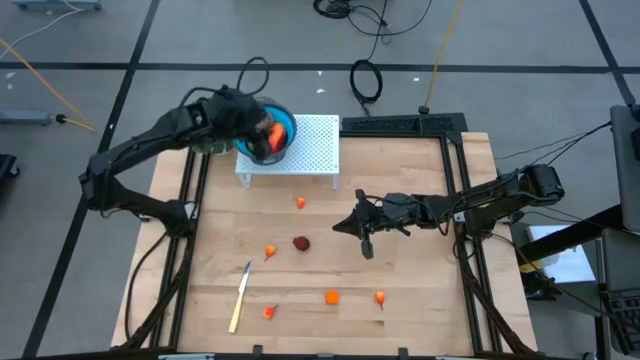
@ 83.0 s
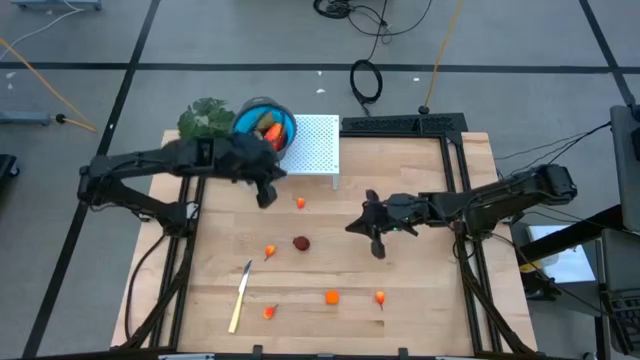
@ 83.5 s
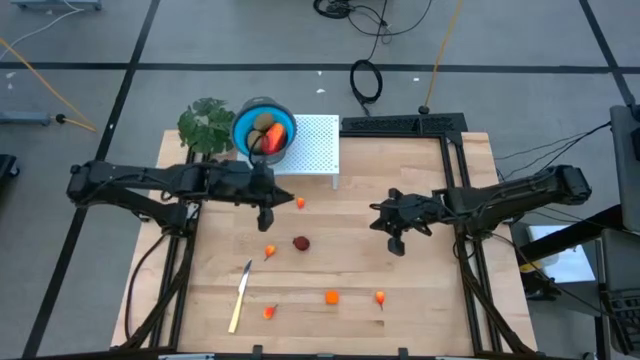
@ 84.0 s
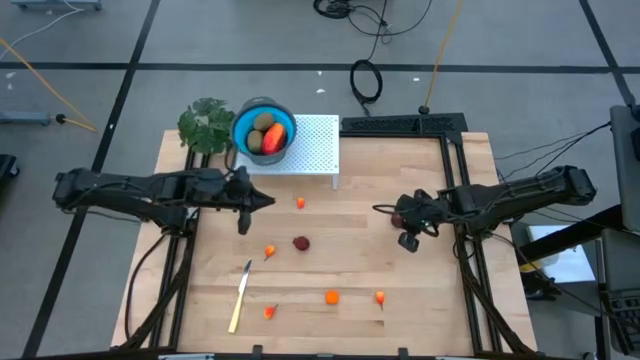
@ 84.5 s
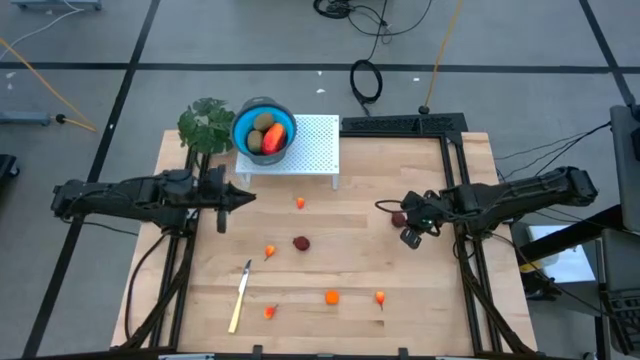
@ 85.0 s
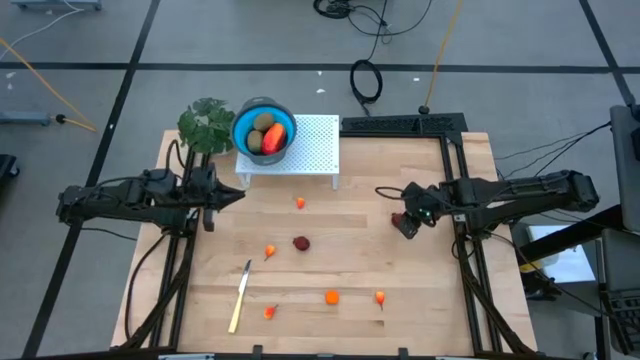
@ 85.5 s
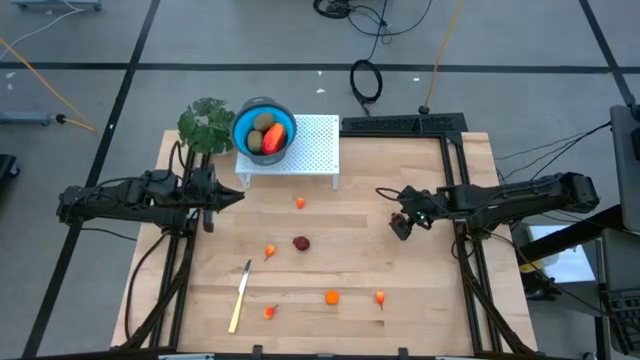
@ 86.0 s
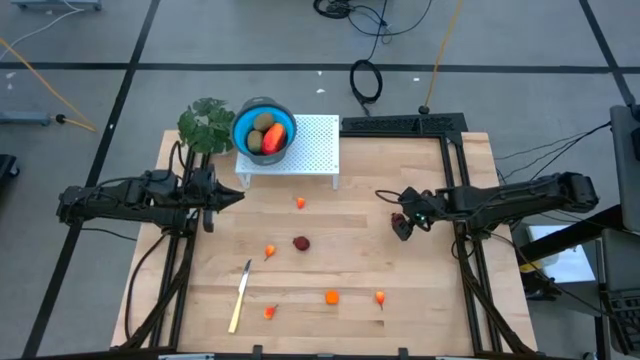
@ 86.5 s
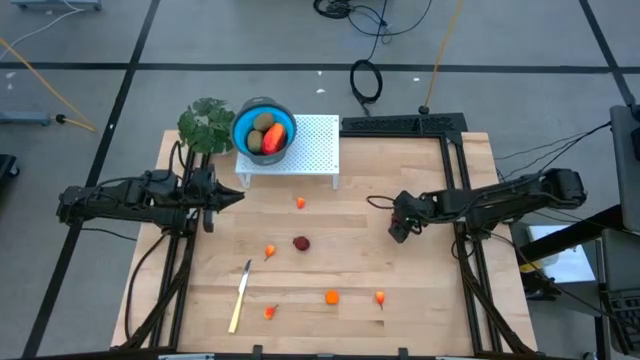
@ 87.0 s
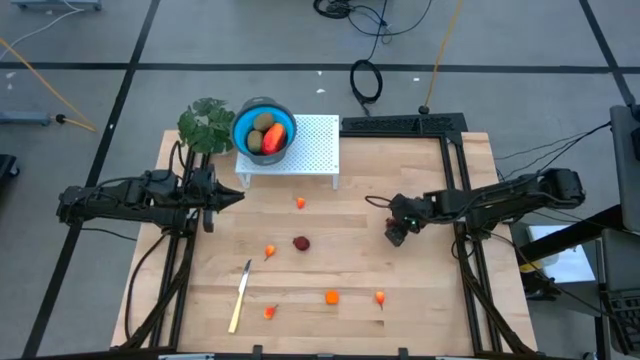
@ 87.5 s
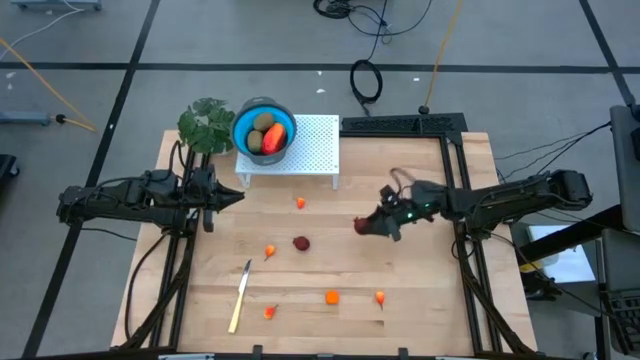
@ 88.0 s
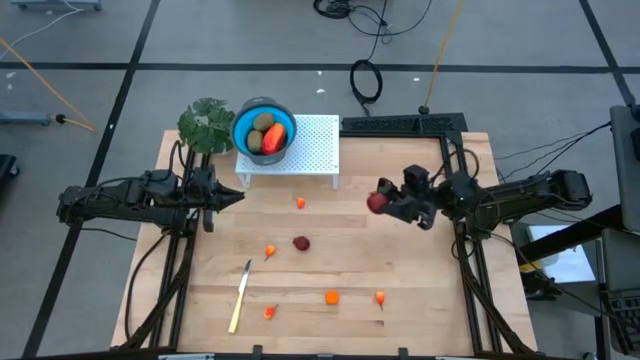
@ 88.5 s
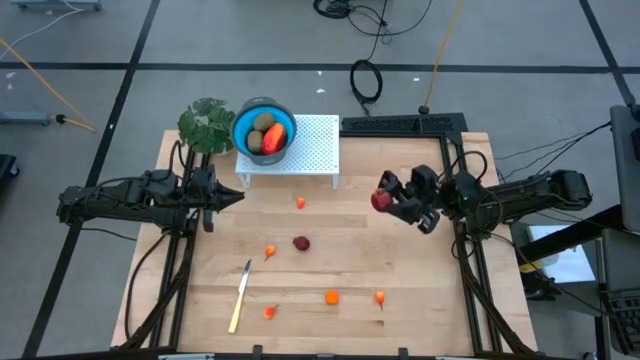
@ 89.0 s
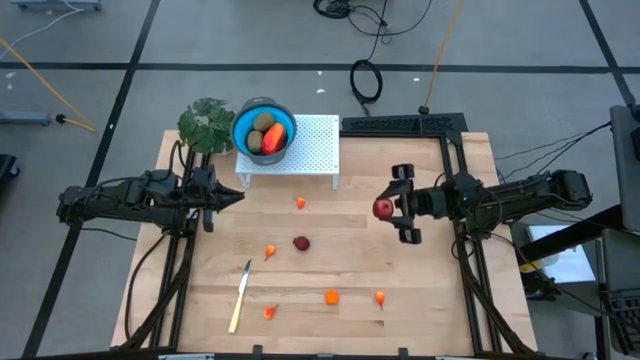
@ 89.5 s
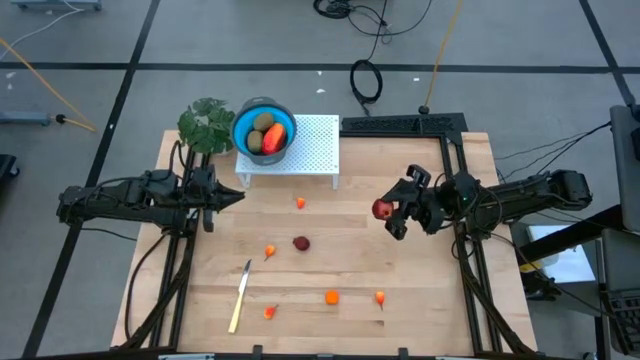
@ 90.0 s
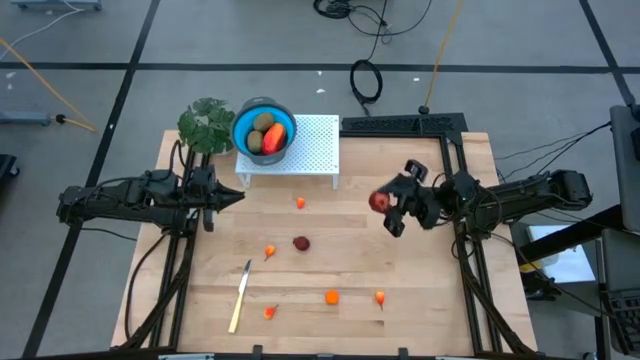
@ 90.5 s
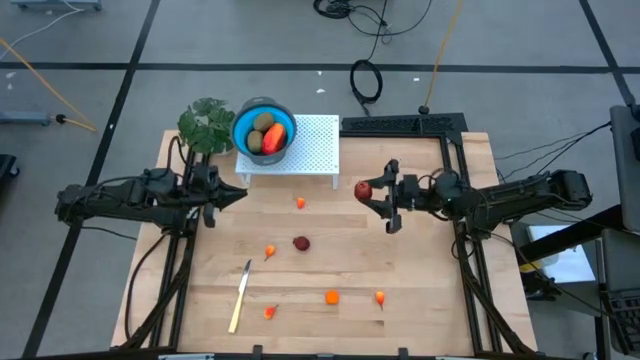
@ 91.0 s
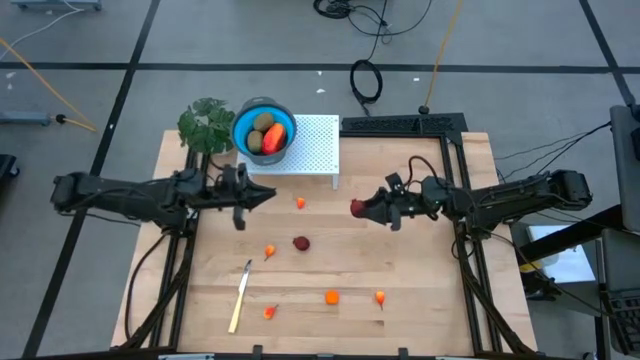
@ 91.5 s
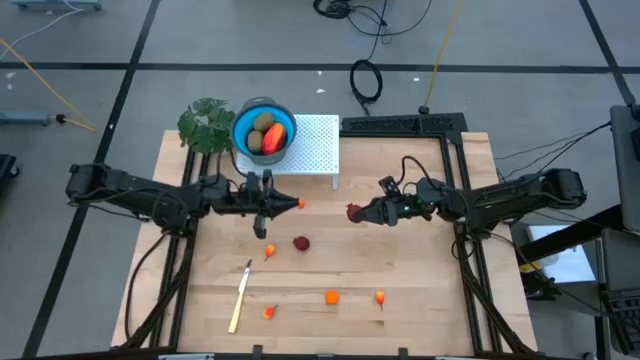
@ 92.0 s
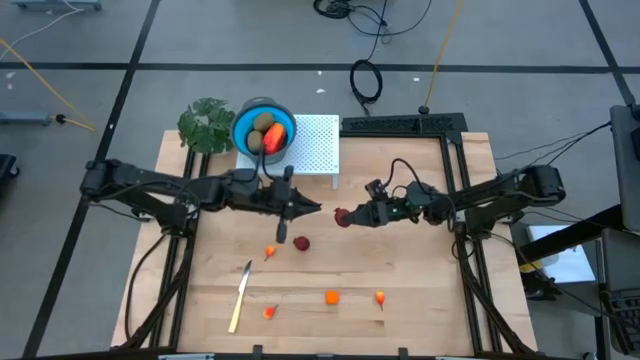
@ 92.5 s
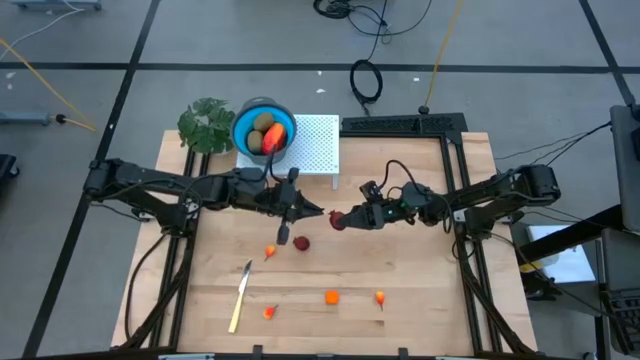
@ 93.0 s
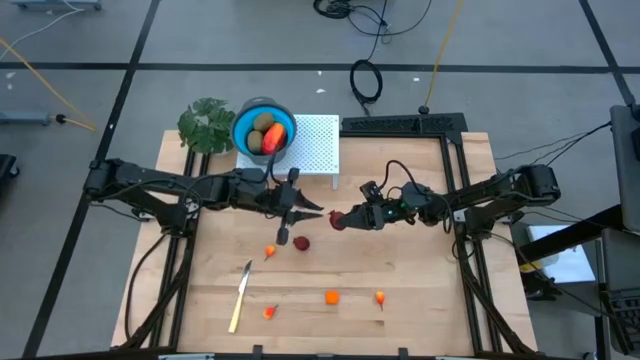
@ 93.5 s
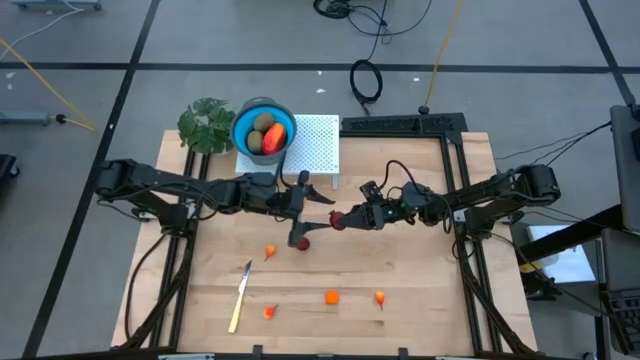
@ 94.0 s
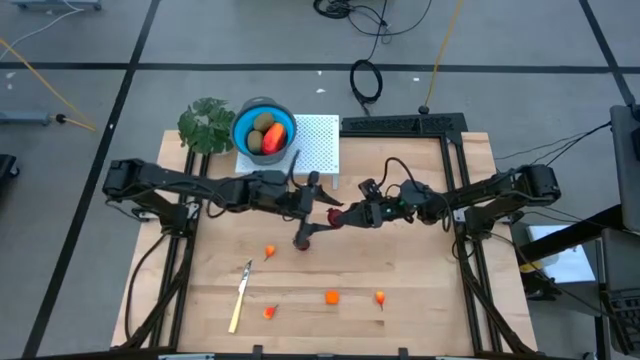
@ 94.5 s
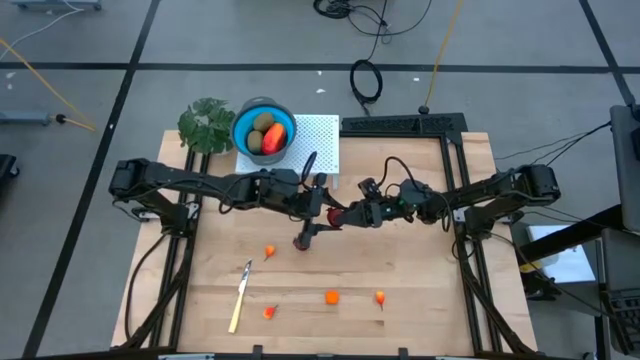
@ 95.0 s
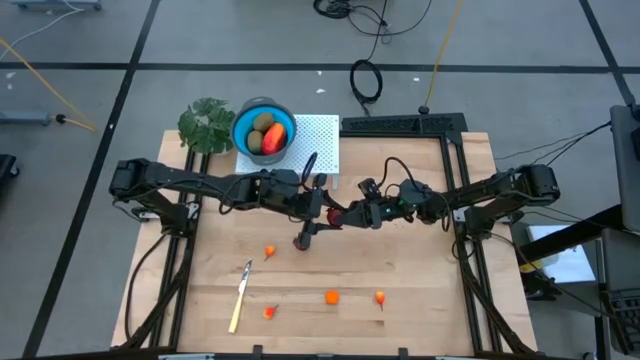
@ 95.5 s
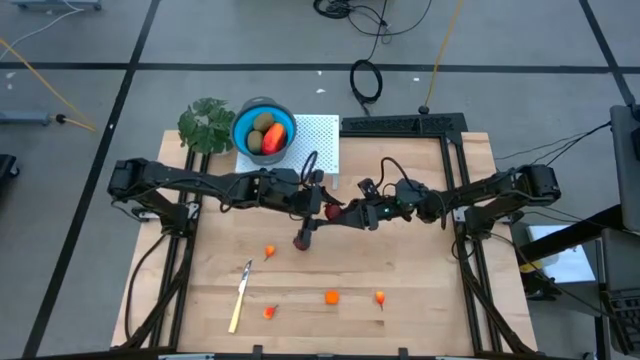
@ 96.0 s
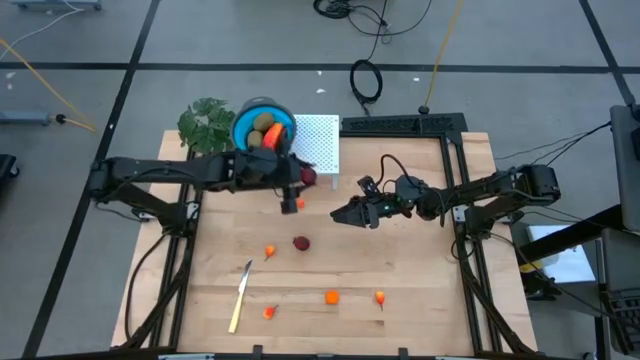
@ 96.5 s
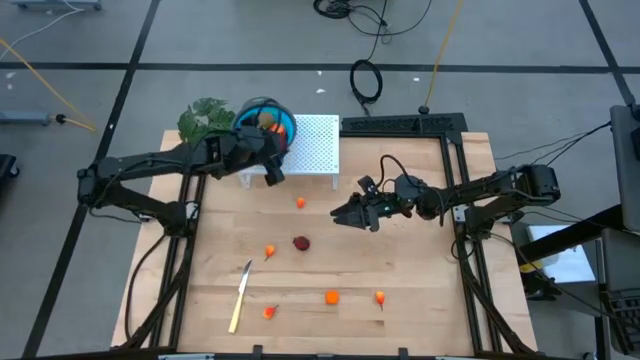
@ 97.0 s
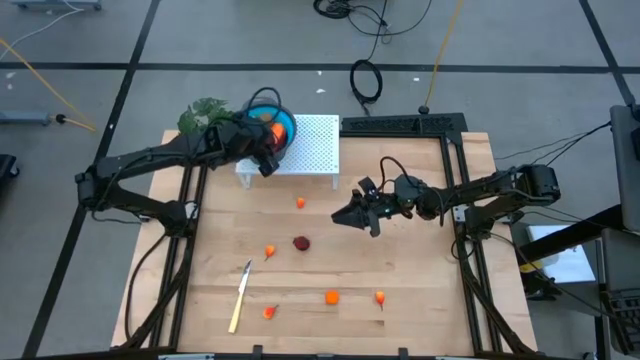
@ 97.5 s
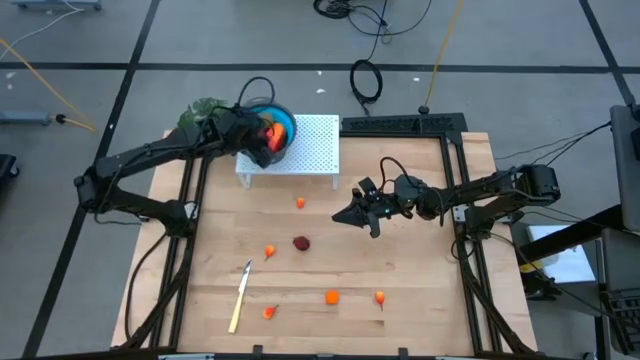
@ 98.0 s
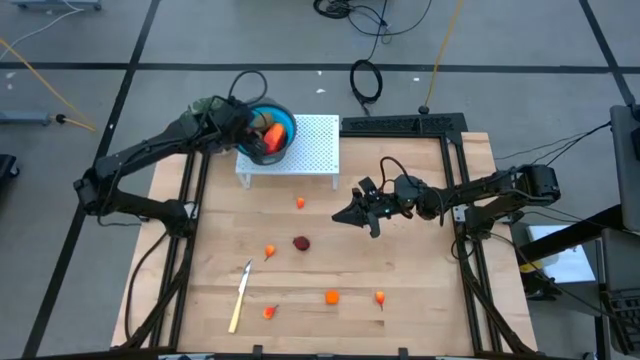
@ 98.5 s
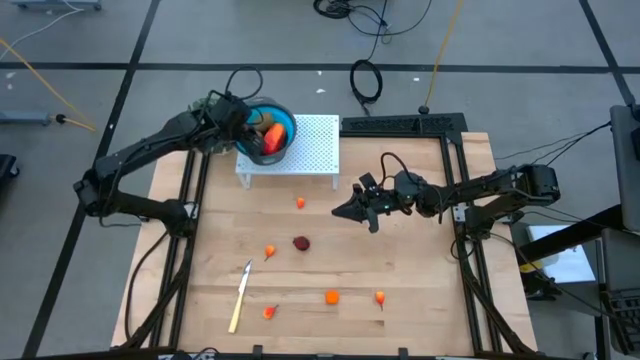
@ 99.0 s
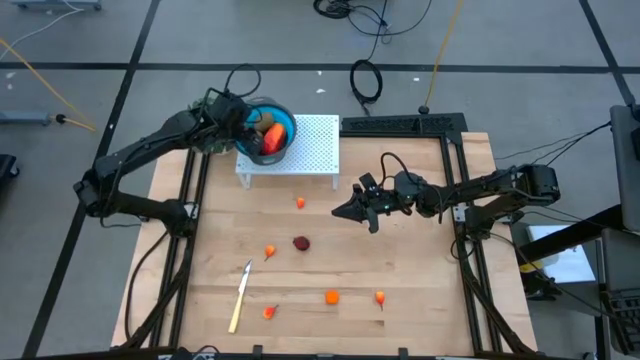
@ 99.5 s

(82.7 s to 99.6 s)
Task: Pick & Place Fruit
Put the right pomegranate into the blue strainer bowl on the shelf

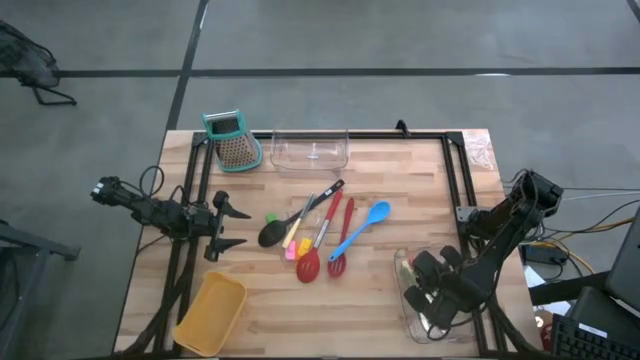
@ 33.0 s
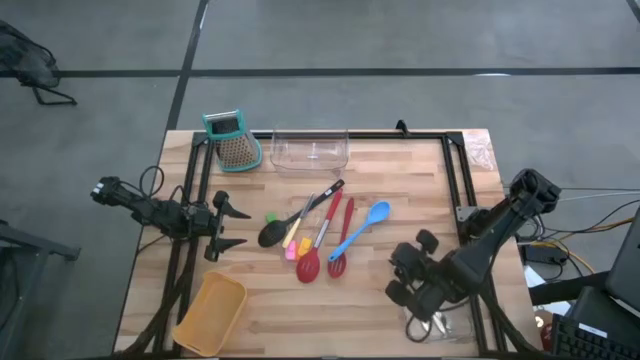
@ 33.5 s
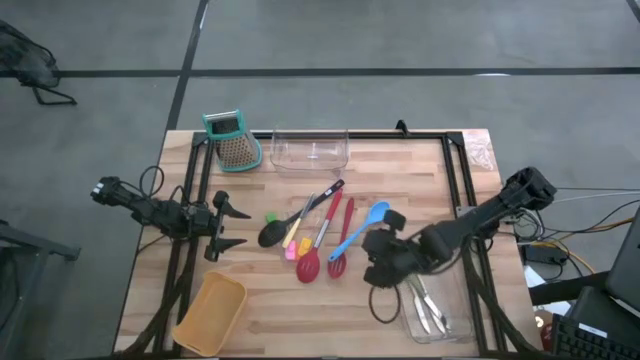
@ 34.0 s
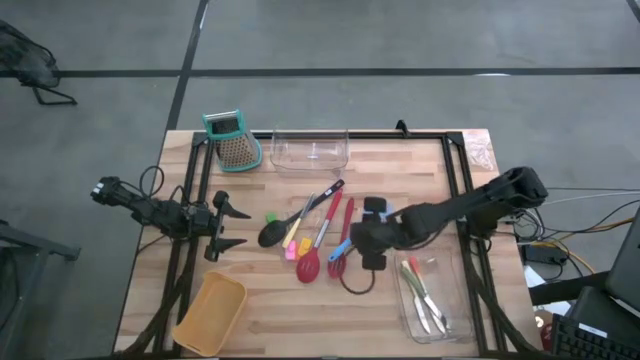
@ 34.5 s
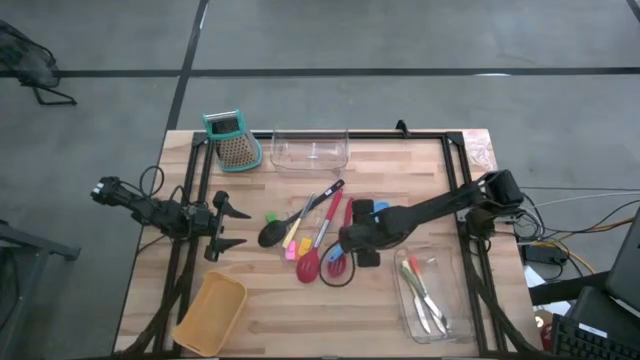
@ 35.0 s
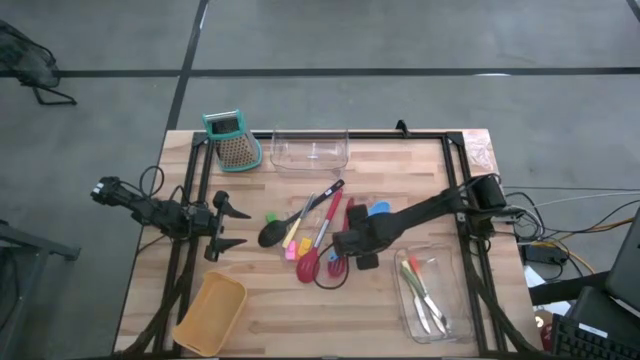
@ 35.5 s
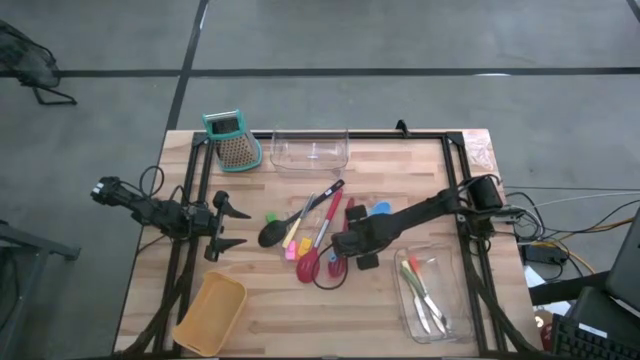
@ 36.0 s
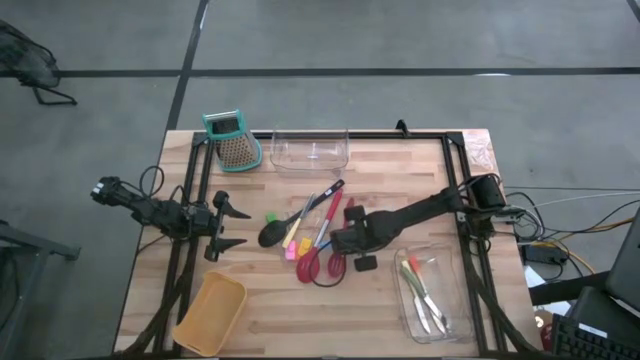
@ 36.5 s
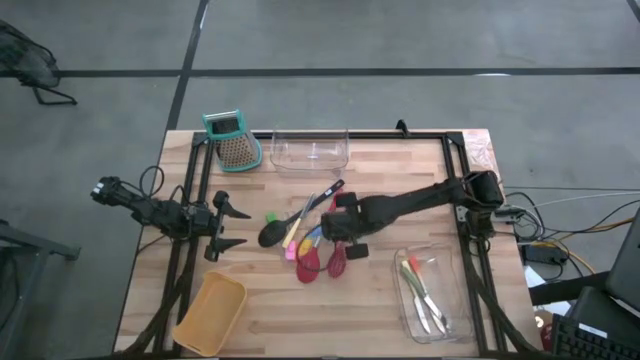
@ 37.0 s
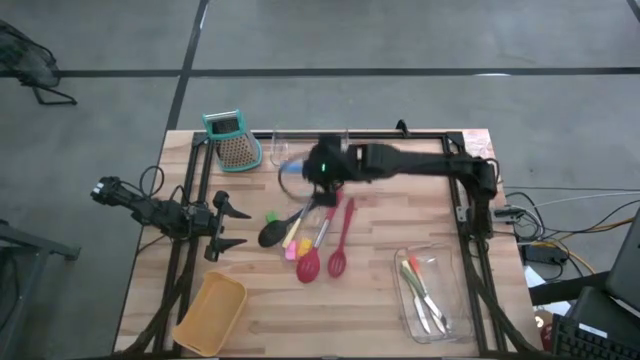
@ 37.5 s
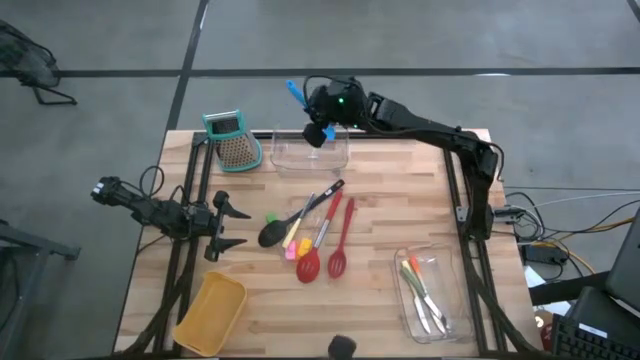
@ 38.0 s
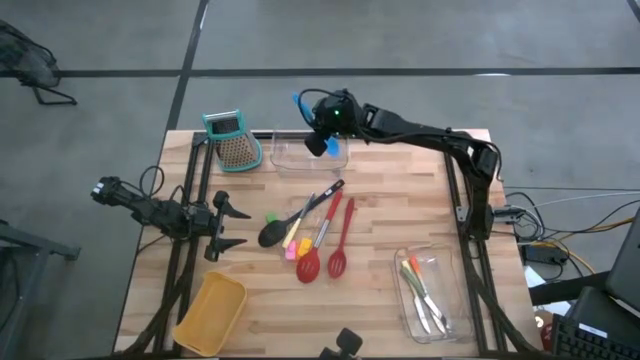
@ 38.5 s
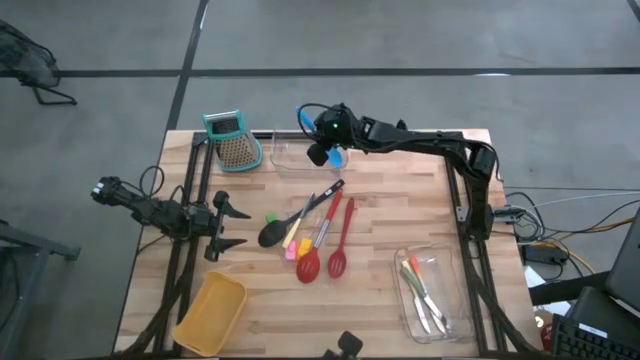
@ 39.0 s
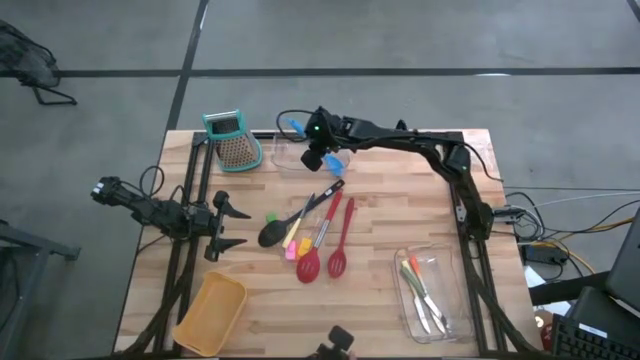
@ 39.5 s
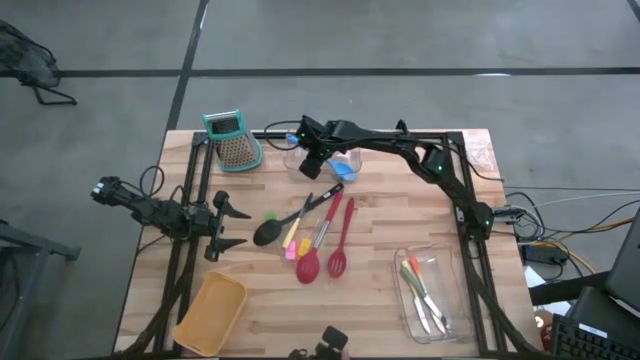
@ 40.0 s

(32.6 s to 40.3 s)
Task: Pick & Place Kitchen Items
Put the blue spoon into the top transparent bin
